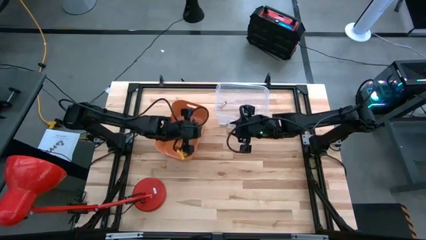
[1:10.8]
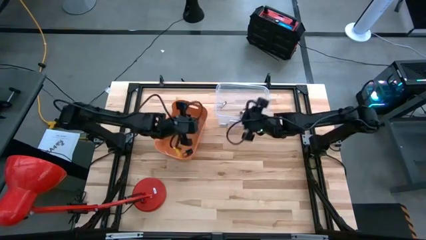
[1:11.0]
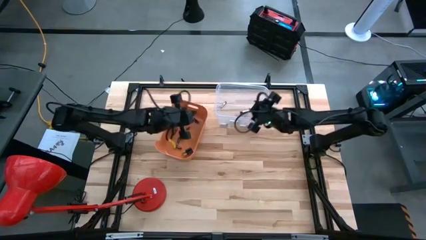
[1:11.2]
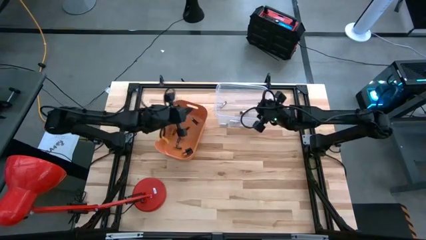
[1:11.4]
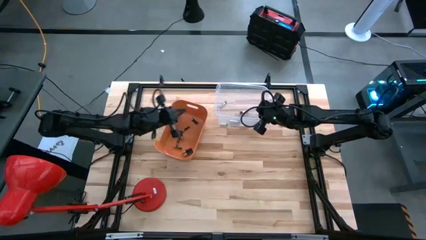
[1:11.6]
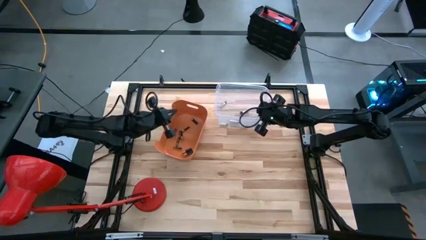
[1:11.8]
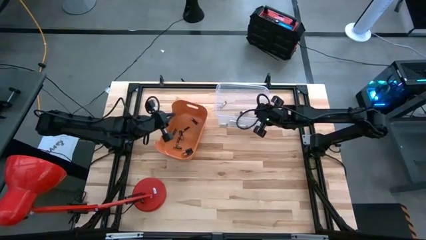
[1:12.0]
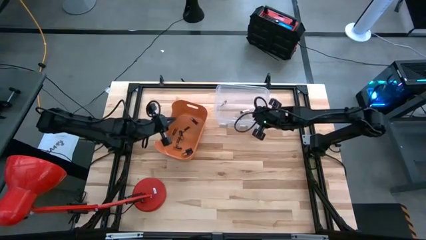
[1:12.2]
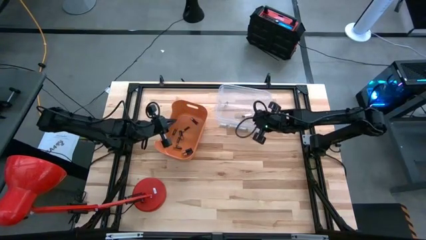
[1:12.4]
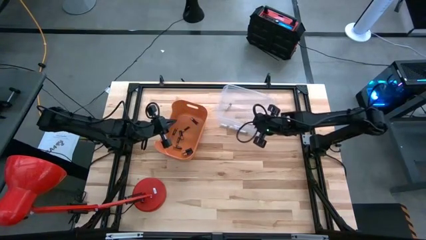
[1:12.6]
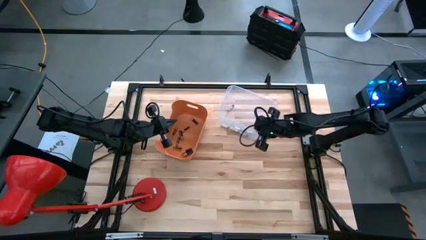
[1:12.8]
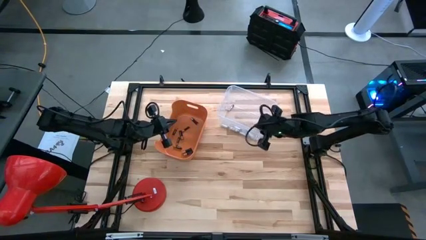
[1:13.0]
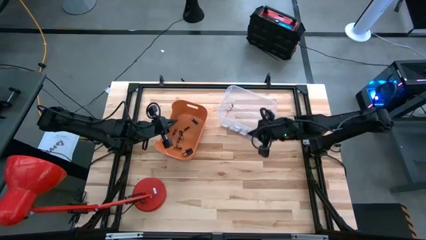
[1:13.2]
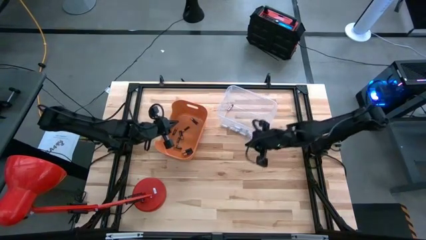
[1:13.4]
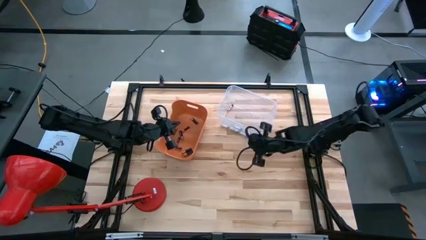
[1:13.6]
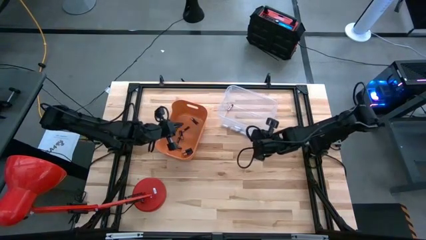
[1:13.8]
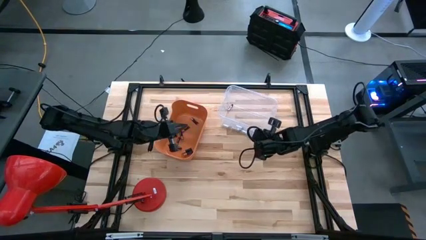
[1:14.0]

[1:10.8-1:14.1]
Task: Sort batteries
Adjust the transparent bin

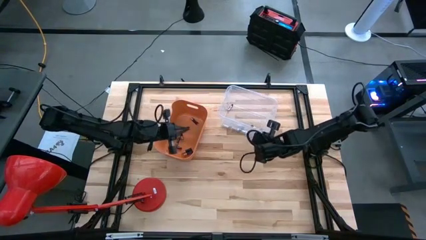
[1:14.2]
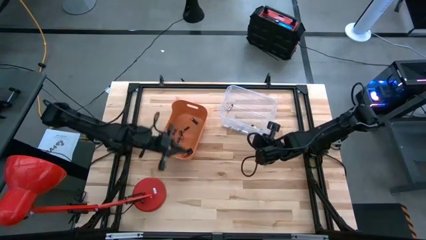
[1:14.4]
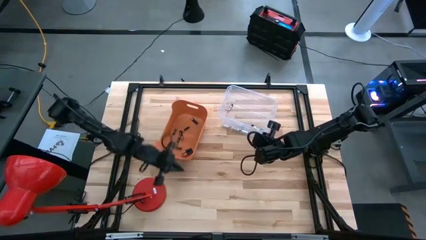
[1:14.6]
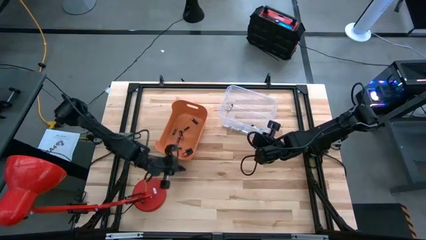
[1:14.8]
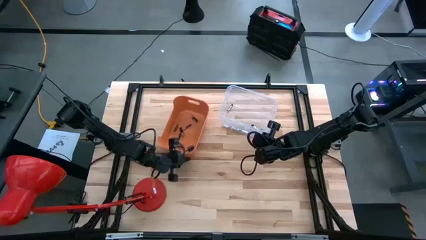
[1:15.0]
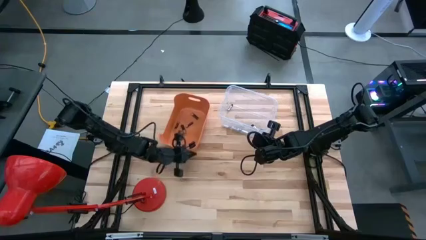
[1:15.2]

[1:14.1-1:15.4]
Adjust the orange bin

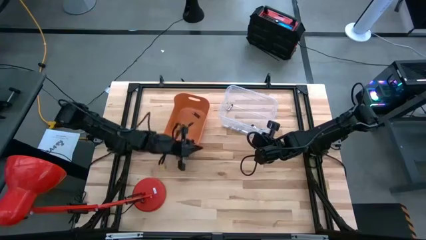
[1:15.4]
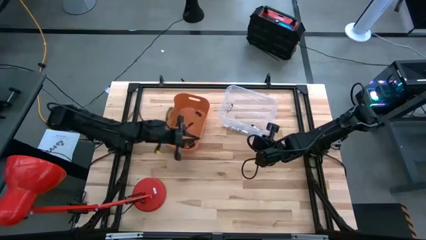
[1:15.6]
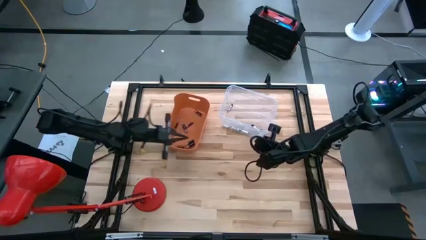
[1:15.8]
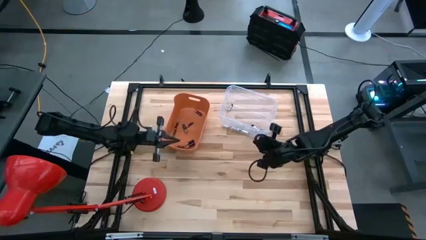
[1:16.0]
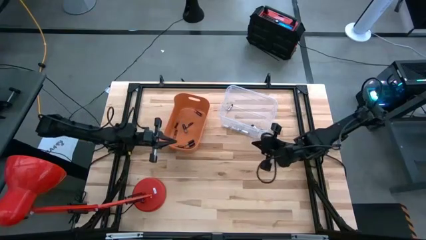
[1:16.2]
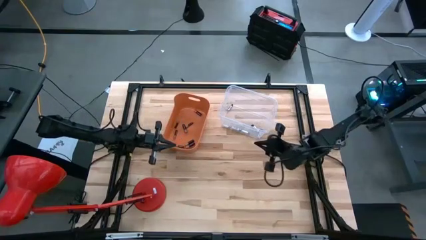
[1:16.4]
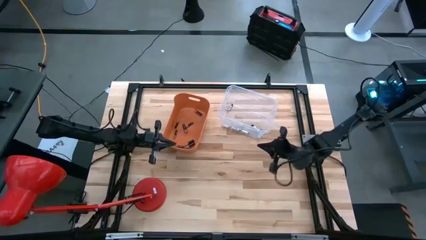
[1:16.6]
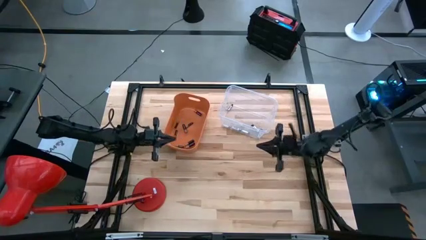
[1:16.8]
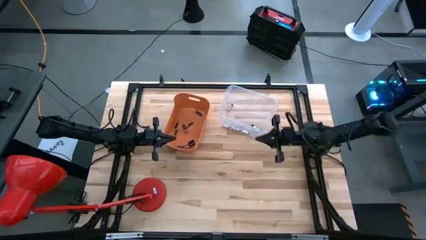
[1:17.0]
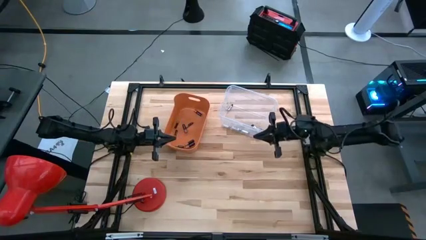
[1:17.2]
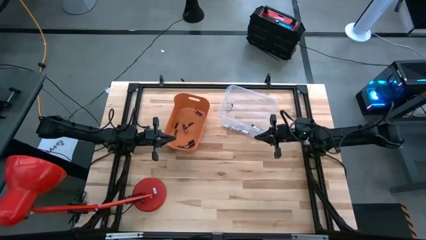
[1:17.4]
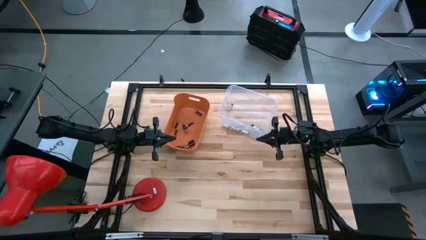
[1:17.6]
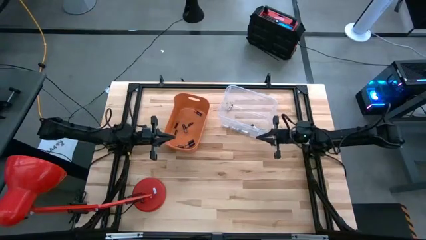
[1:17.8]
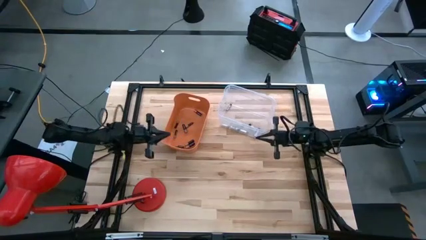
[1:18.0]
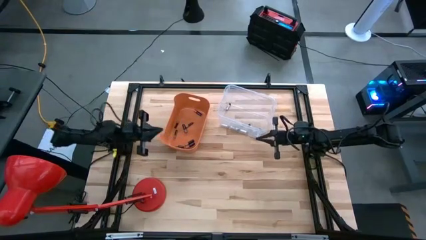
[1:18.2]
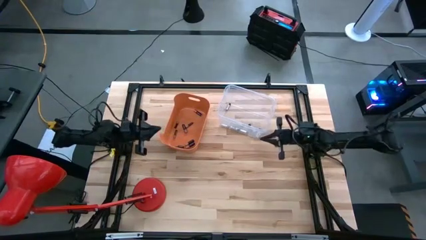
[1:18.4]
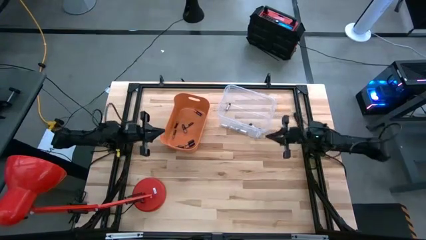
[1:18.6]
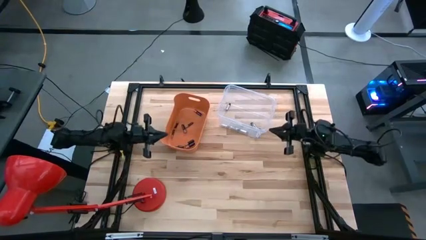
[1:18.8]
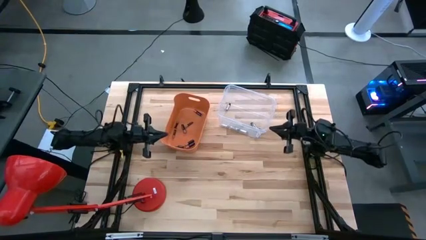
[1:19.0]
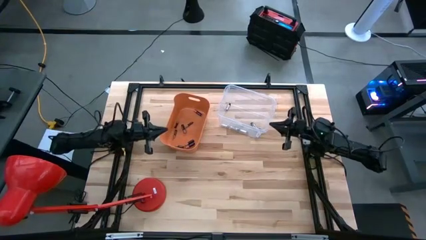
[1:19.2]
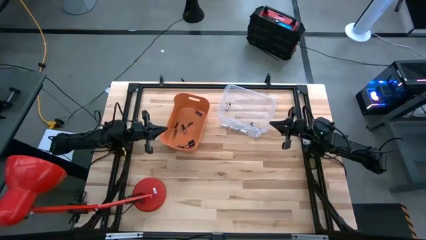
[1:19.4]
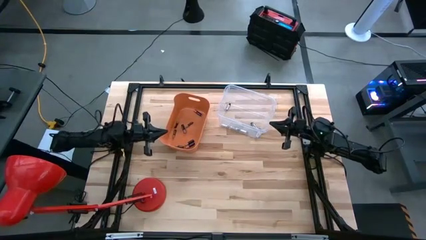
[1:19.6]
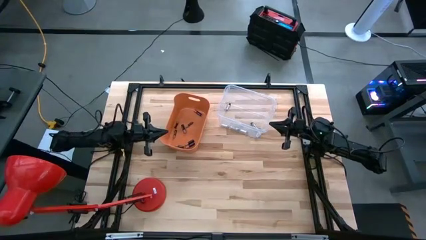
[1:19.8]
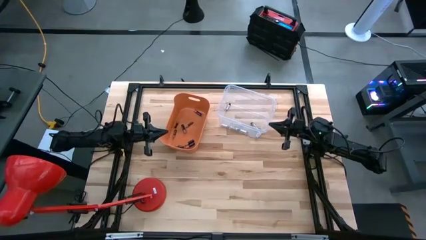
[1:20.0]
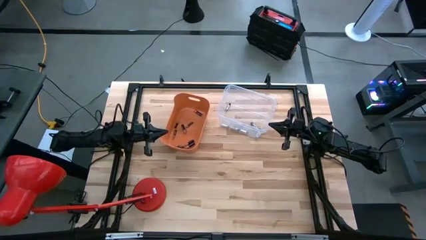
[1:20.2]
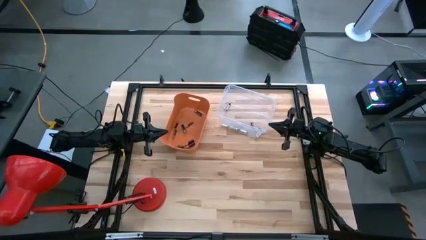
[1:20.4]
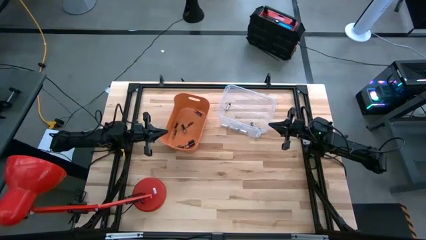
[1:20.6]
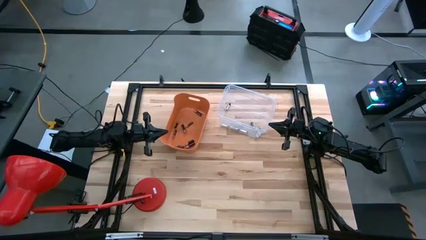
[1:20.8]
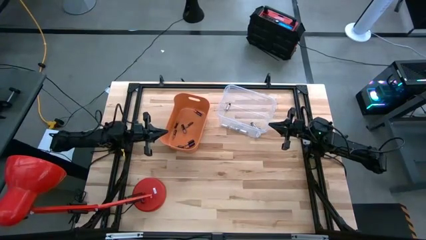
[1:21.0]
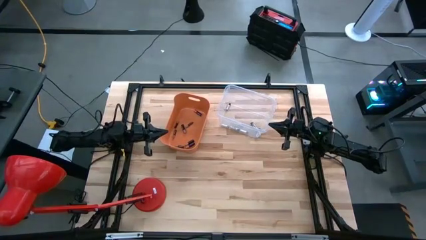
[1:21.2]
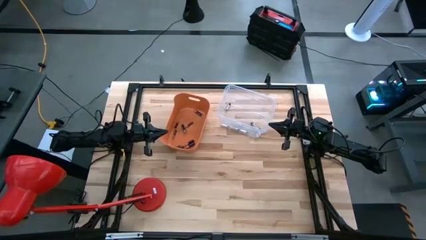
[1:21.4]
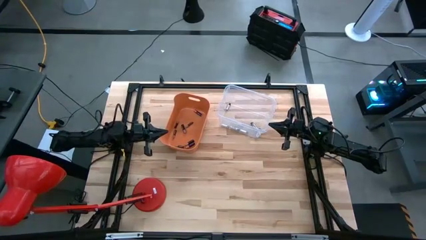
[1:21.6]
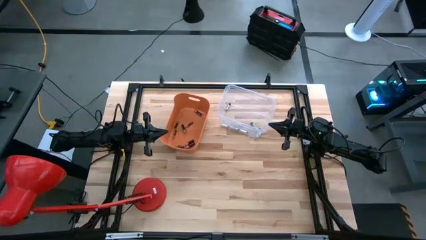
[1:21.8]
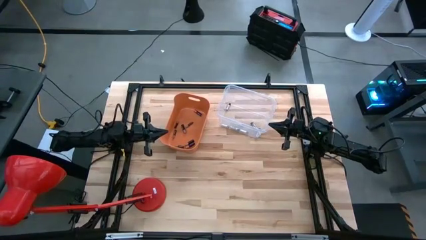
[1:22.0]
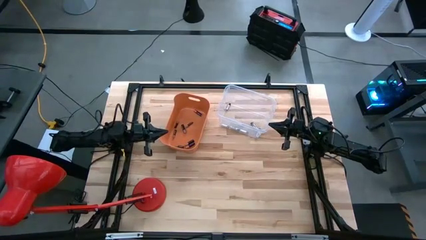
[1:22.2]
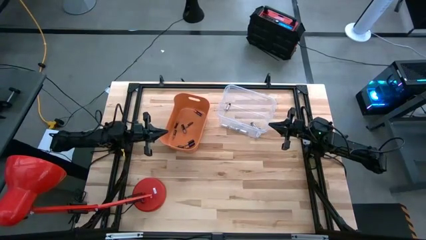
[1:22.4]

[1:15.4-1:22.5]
Return to Home Position

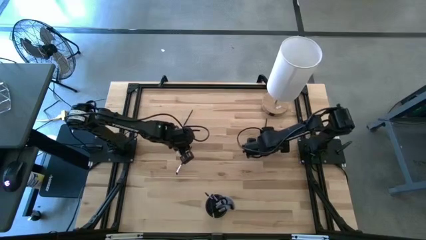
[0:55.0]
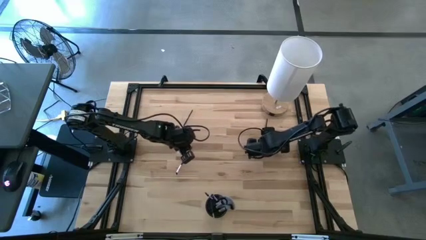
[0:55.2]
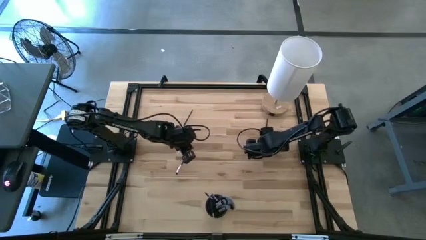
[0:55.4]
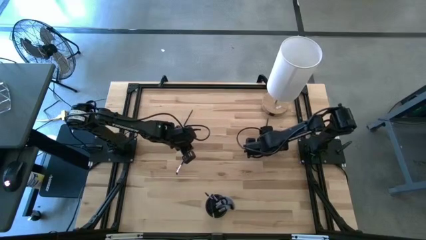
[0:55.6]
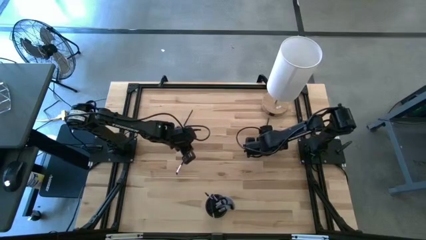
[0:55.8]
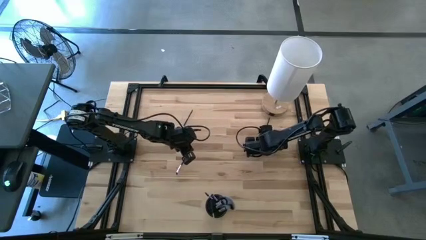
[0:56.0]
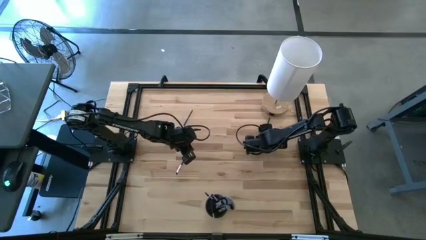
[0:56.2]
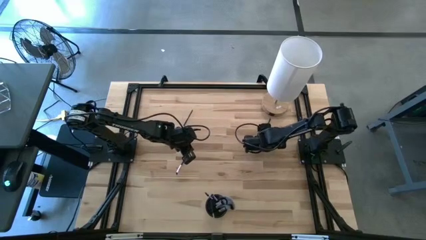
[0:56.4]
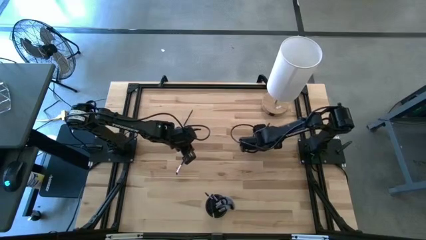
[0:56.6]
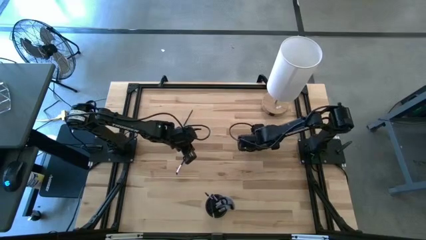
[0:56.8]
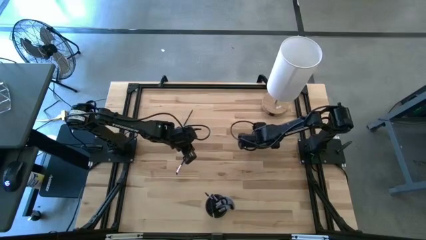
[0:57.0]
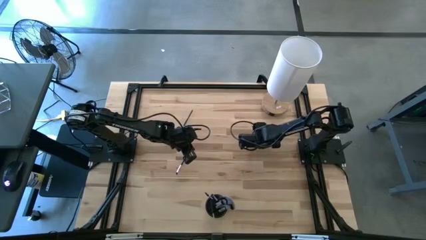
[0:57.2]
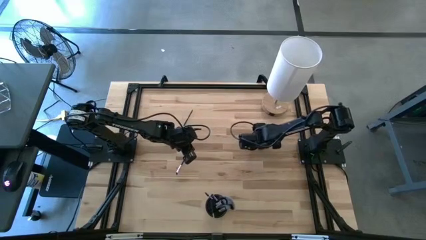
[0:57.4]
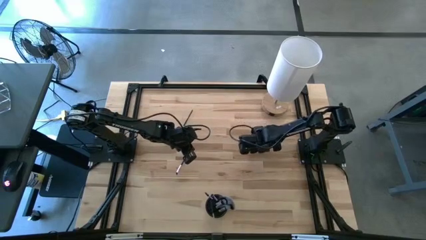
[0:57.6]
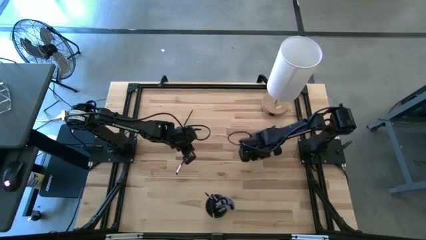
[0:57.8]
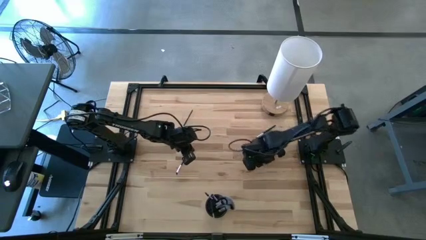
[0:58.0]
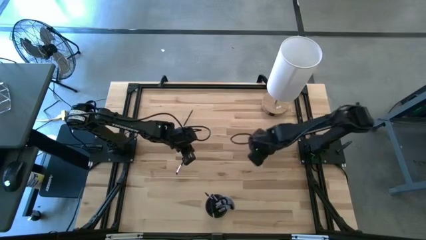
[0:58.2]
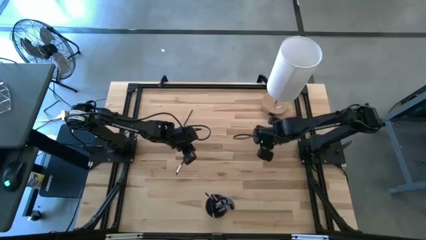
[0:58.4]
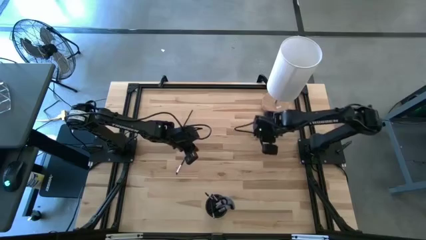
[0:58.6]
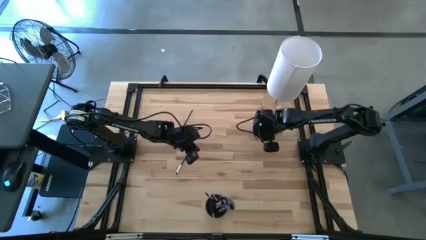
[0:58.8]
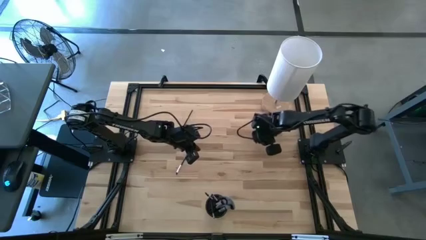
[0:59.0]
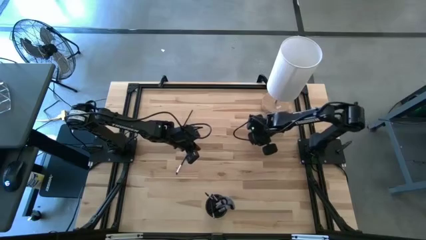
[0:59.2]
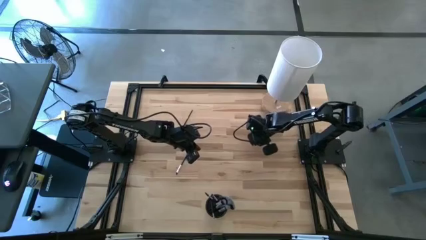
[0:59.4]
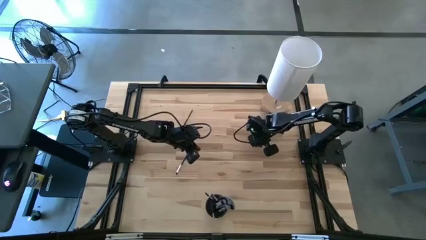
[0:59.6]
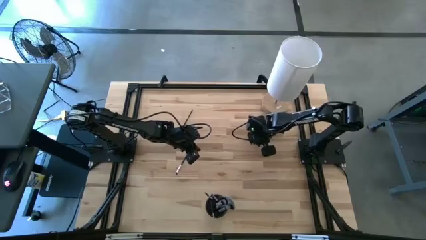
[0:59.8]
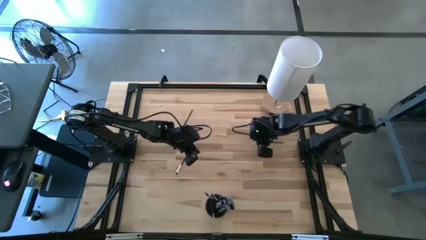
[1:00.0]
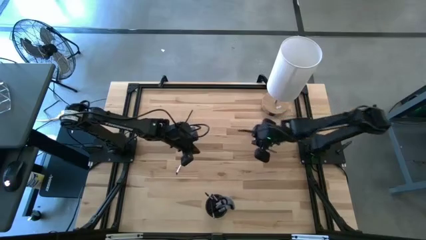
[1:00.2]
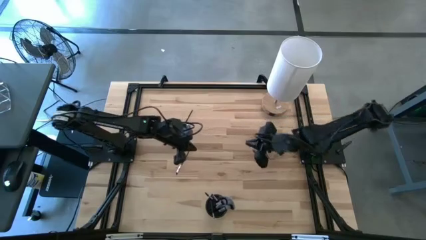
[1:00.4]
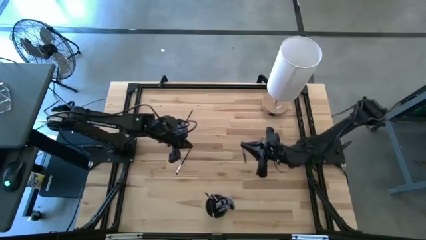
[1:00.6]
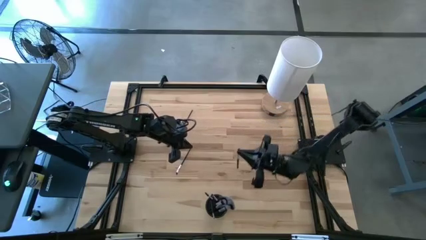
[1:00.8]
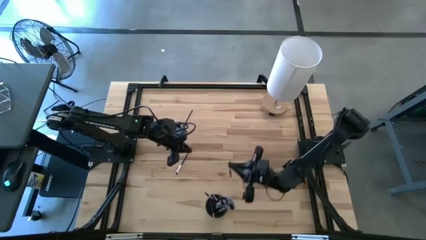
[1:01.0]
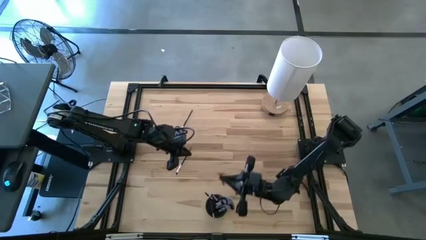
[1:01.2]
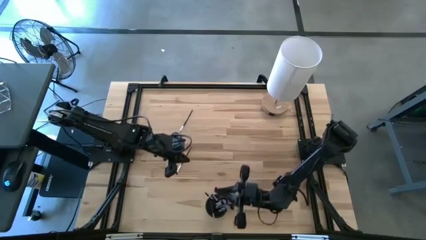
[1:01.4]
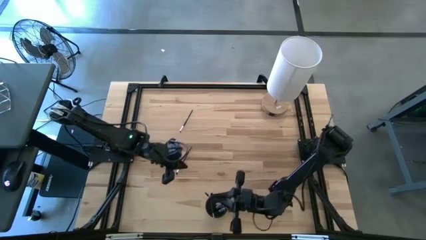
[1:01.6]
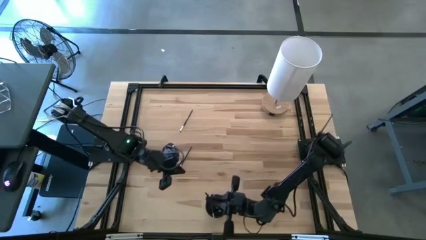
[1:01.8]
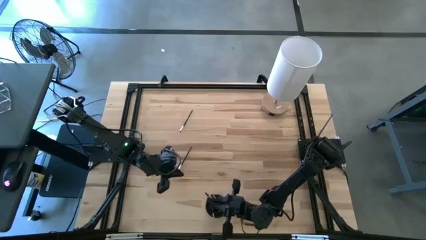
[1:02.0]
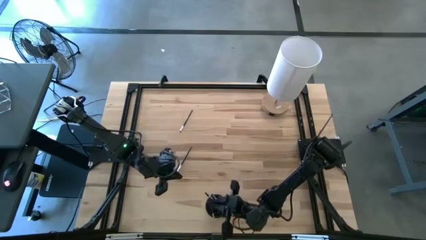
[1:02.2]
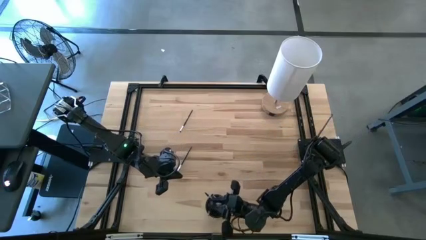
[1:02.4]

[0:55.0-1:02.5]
Task: Put items in baskets/containers
Put the black eyeshadow brush into the black pen holder
